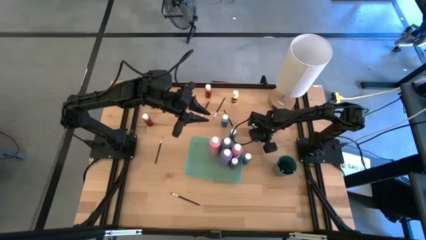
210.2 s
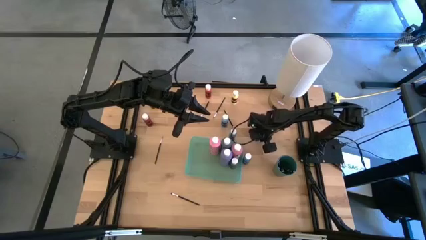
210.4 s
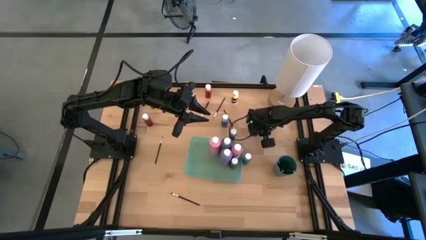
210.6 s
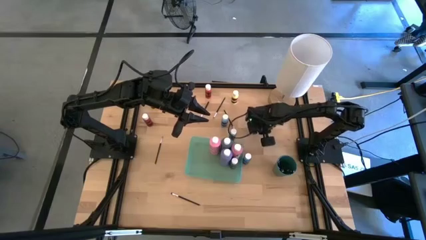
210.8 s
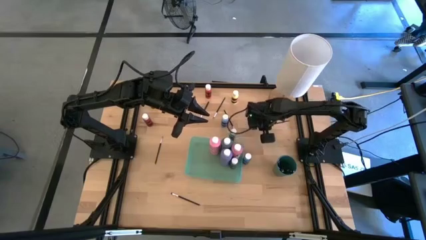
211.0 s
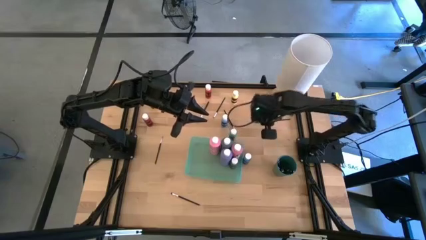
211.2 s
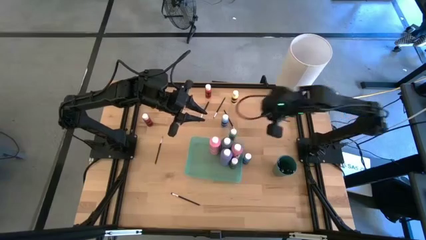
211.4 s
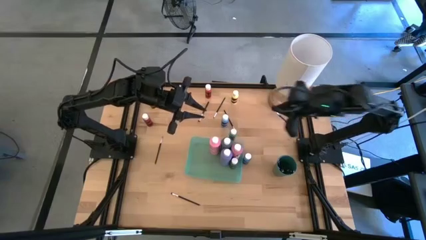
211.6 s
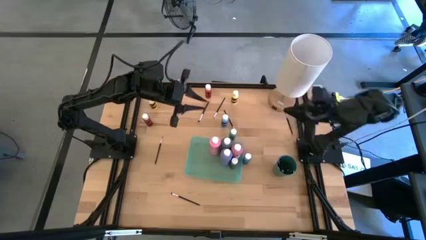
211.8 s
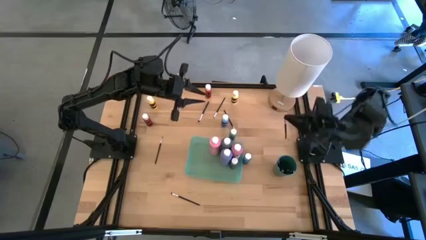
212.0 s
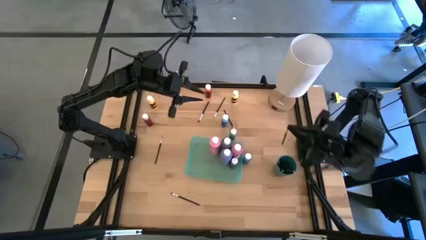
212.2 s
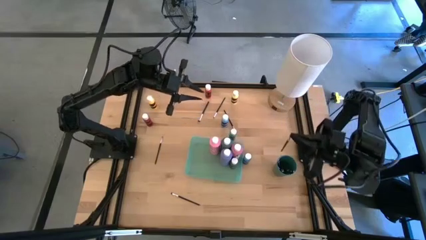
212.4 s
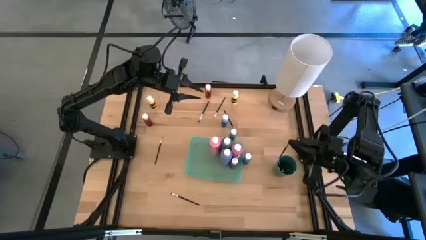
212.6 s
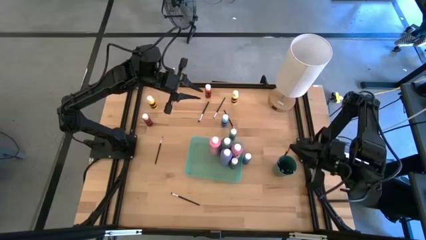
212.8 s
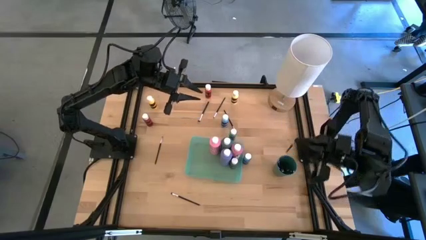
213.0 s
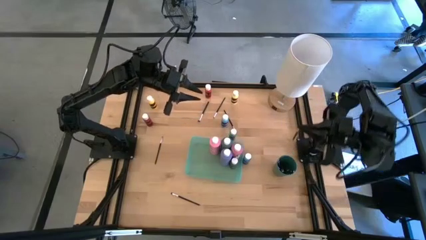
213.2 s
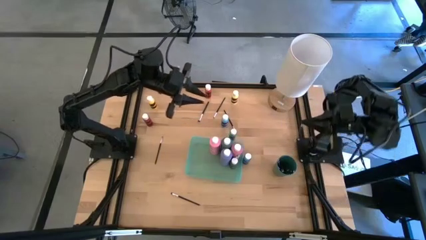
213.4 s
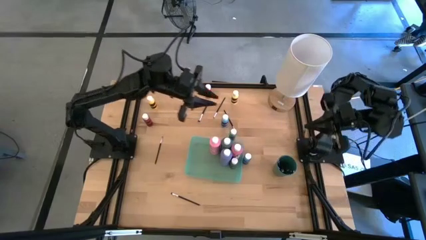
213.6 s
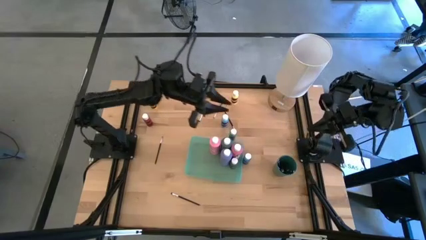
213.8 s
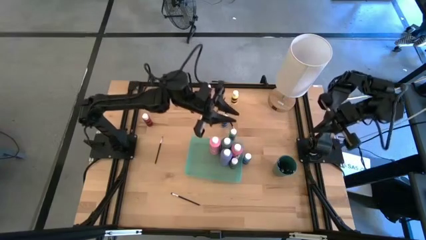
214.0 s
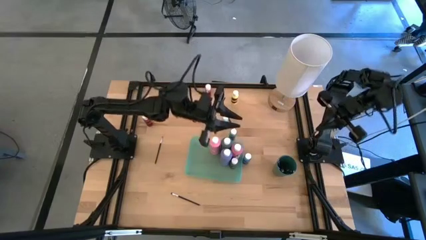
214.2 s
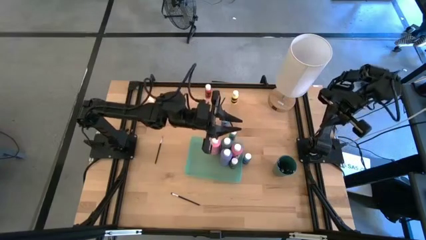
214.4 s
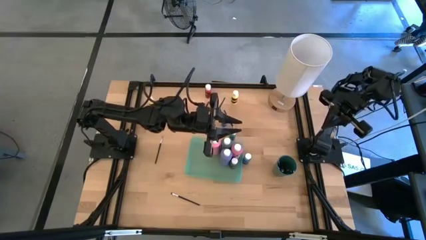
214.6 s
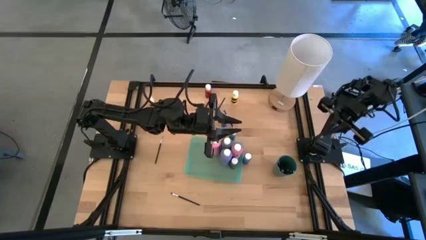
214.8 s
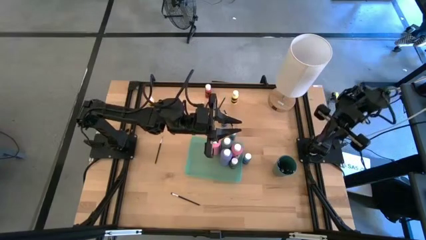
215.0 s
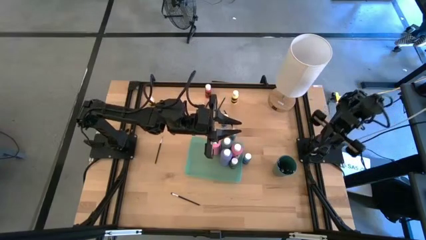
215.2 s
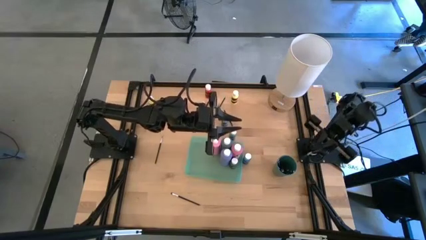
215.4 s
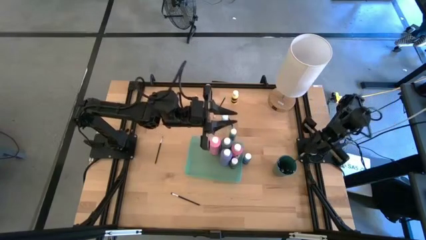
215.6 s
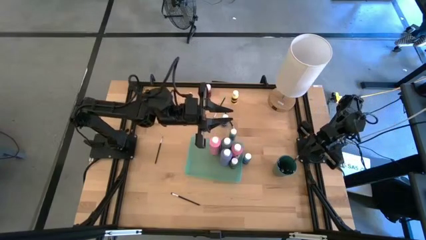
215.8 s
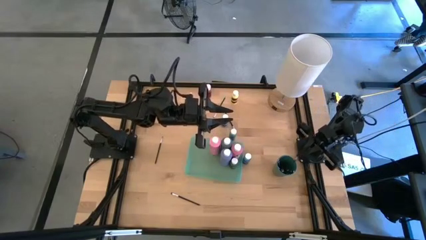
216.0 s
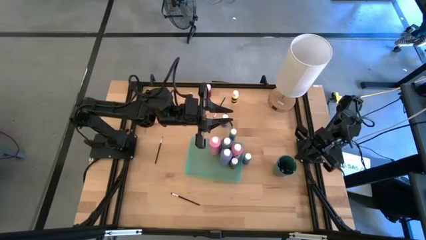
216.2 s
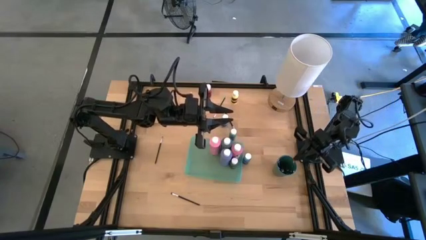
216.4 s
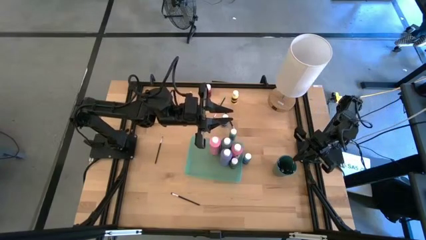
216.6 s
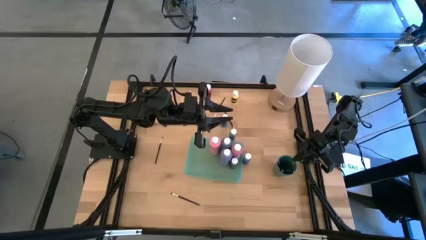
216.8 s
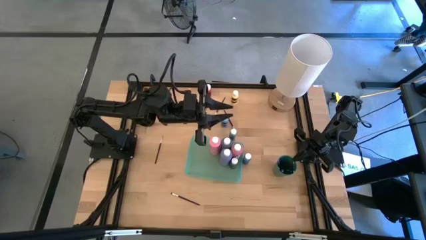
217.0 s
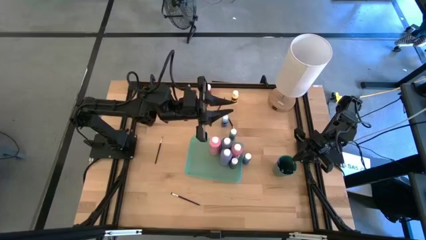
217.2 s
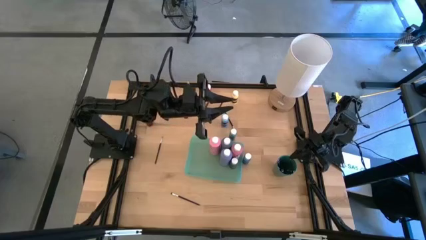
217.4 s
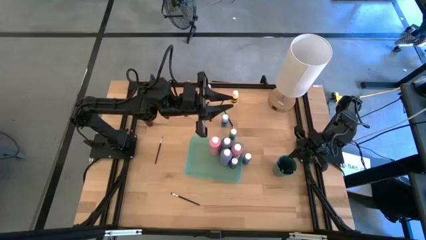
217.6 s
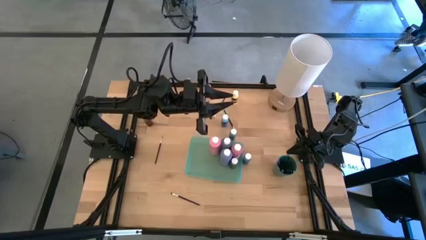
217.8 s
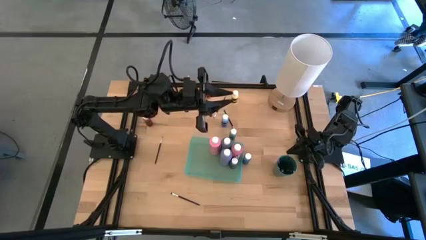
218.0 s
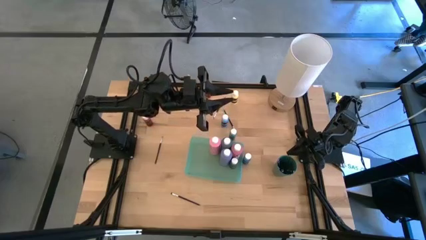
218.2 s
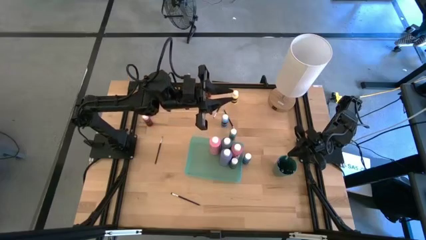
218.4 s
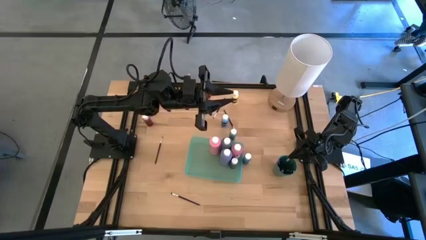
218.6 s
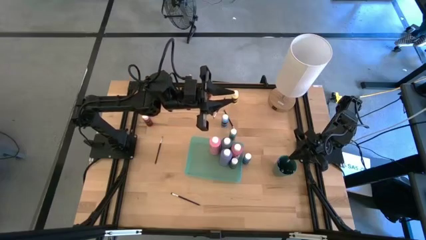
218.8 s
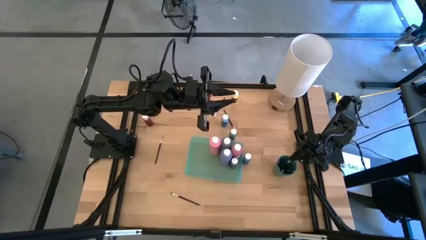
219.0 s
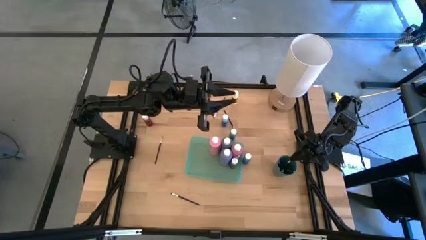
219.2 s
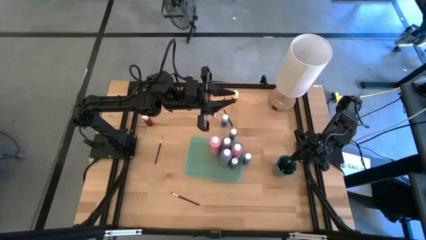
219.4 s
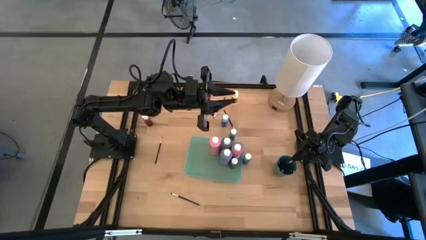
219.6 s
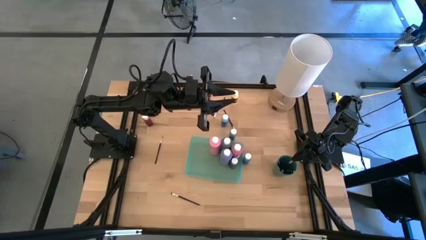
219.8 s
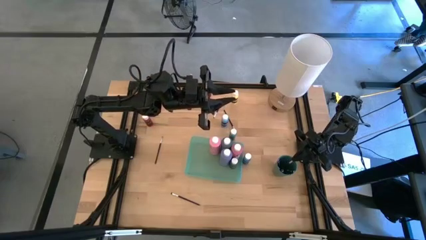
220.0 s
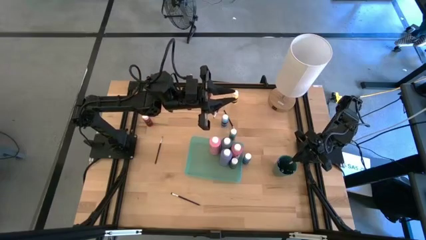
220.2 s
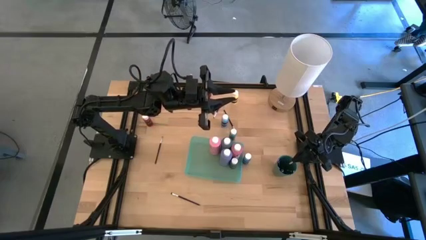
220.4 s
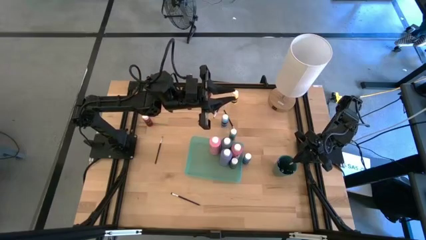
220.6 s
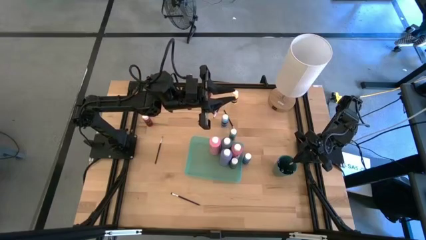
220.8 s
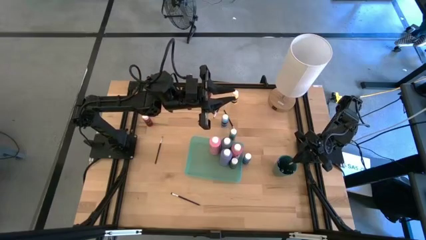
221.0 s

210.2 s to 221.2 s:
Task: Pick & Place Paint Supplies
Put the black eyeshadow brush into the green cup
